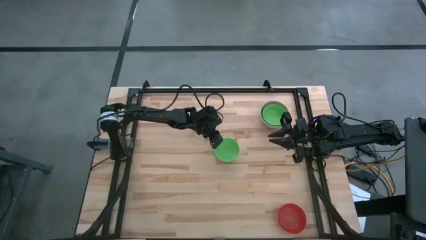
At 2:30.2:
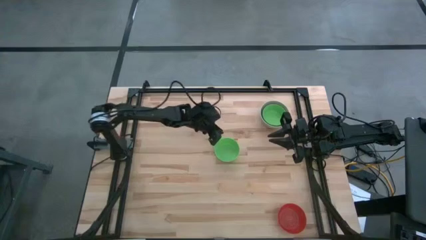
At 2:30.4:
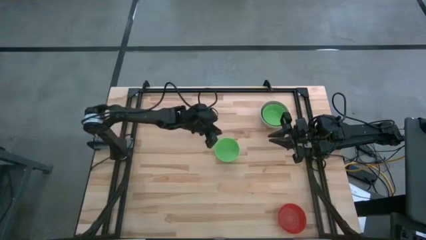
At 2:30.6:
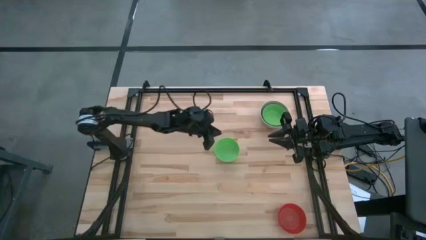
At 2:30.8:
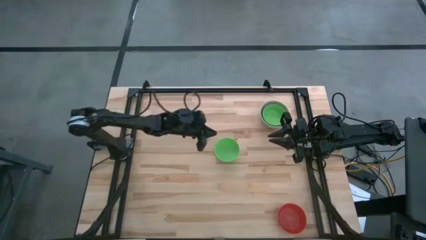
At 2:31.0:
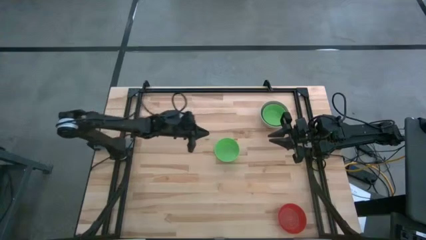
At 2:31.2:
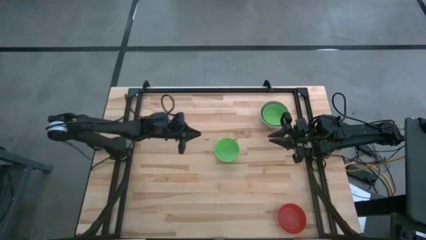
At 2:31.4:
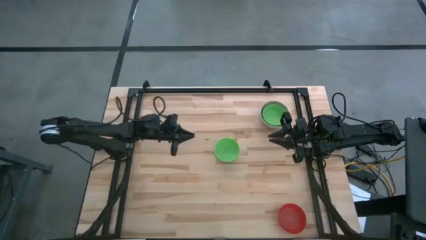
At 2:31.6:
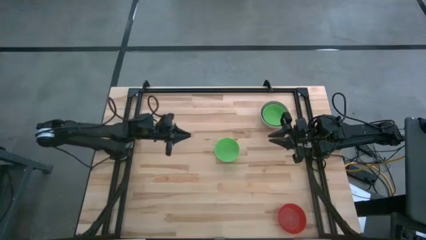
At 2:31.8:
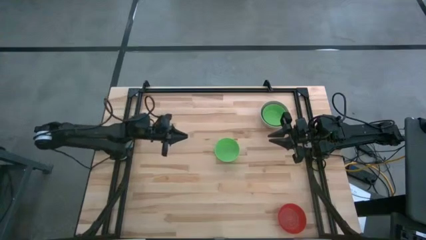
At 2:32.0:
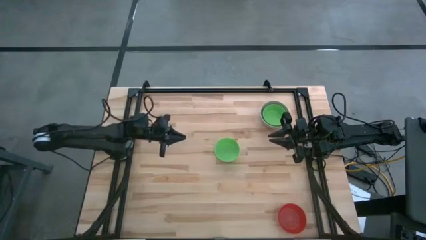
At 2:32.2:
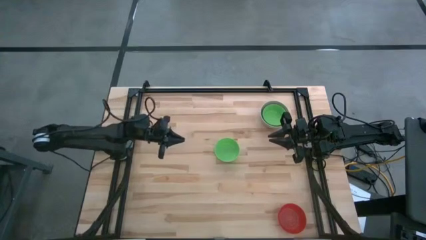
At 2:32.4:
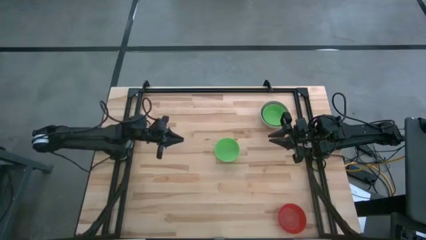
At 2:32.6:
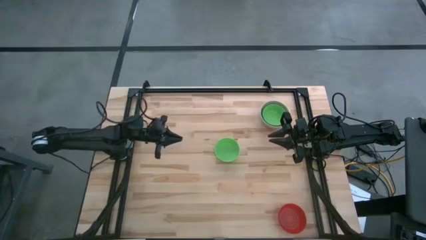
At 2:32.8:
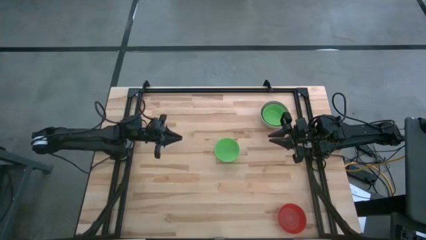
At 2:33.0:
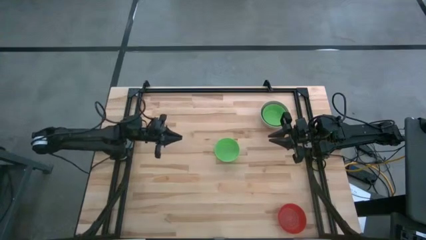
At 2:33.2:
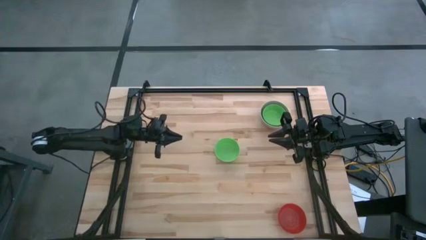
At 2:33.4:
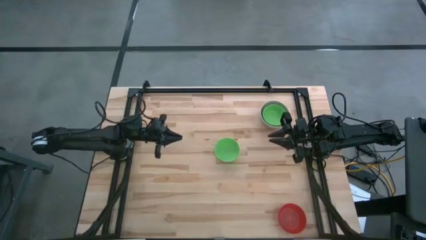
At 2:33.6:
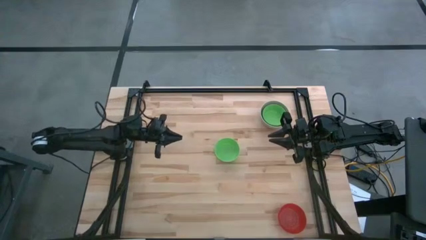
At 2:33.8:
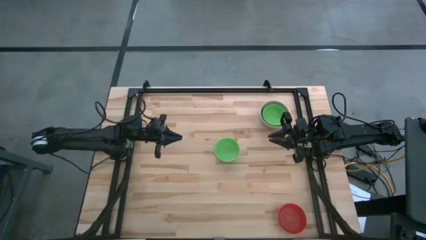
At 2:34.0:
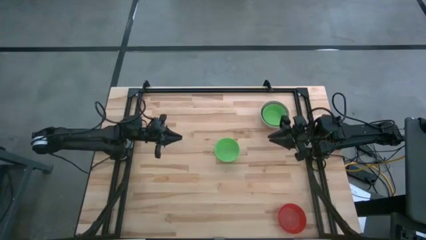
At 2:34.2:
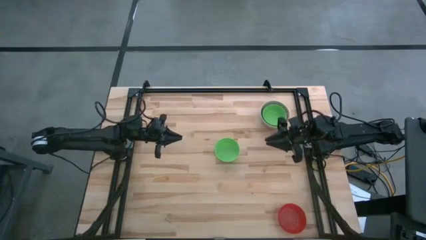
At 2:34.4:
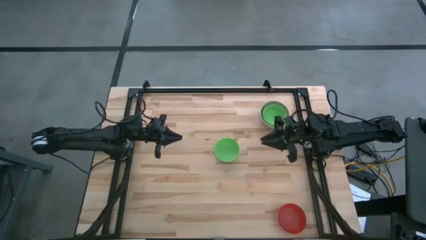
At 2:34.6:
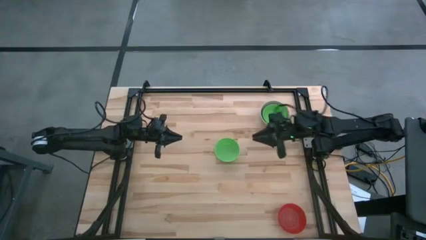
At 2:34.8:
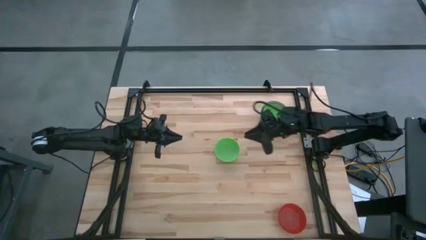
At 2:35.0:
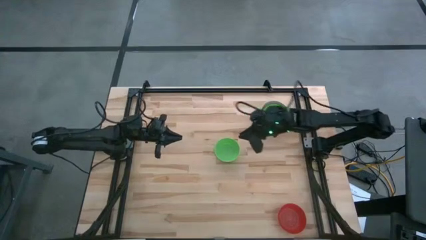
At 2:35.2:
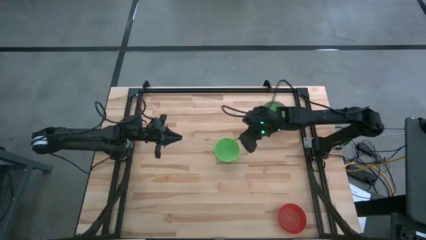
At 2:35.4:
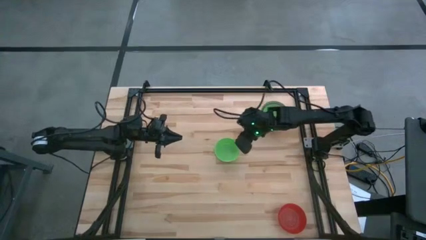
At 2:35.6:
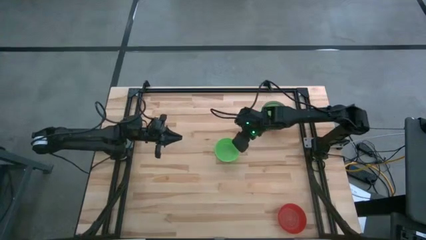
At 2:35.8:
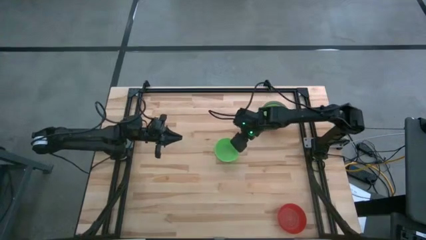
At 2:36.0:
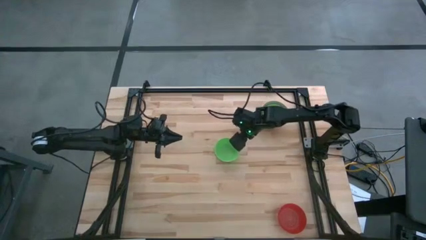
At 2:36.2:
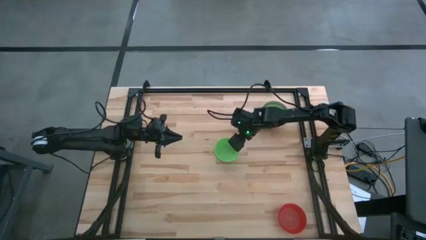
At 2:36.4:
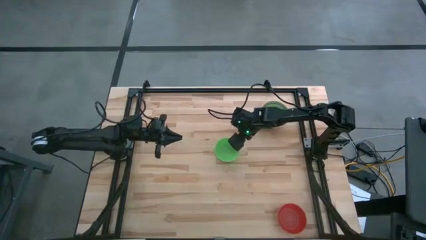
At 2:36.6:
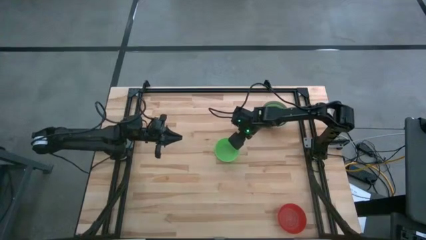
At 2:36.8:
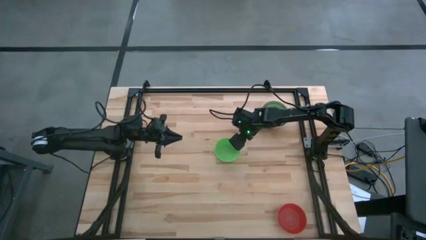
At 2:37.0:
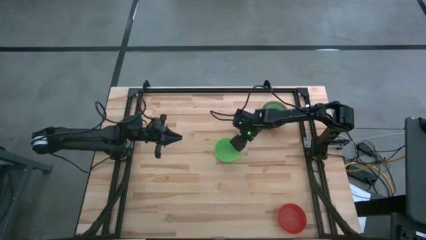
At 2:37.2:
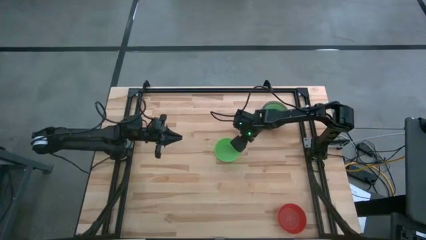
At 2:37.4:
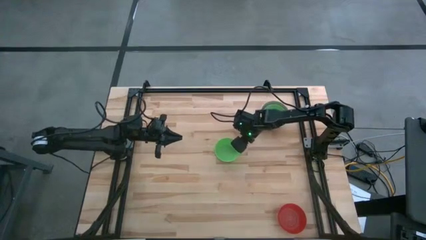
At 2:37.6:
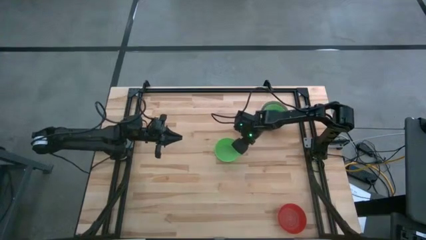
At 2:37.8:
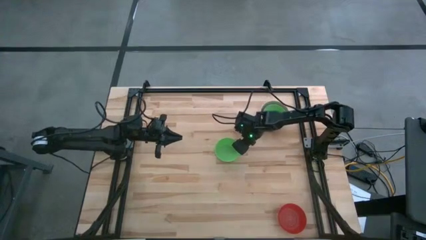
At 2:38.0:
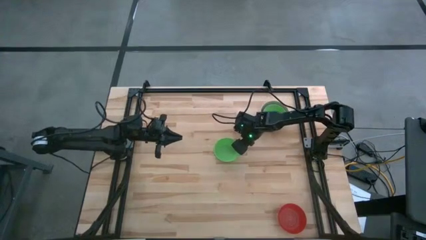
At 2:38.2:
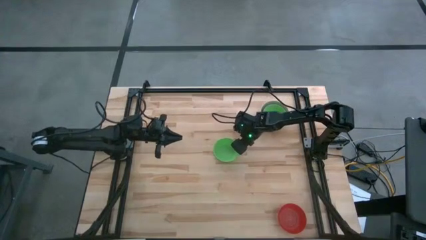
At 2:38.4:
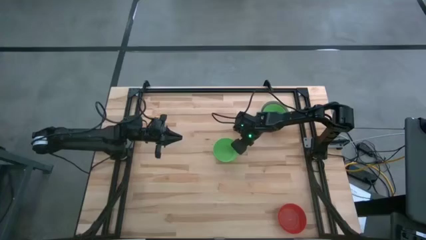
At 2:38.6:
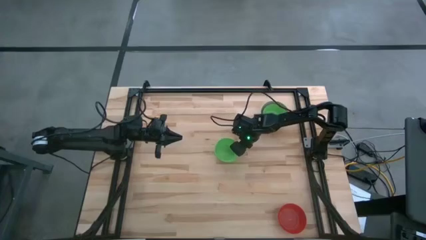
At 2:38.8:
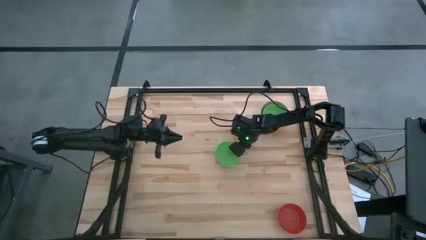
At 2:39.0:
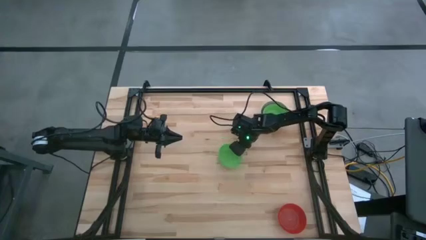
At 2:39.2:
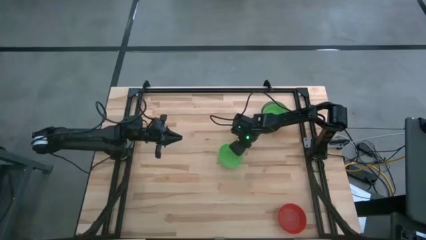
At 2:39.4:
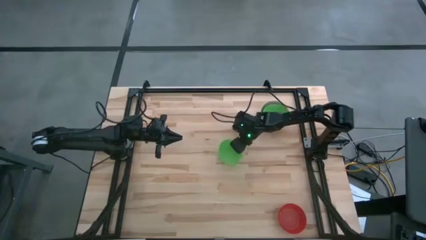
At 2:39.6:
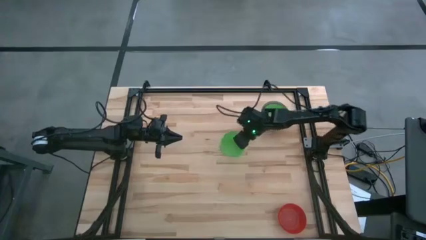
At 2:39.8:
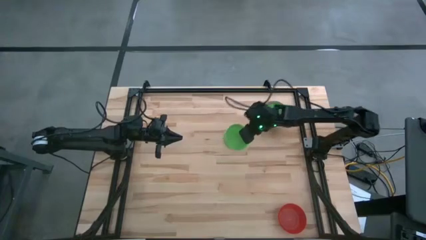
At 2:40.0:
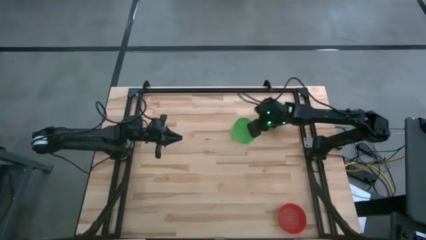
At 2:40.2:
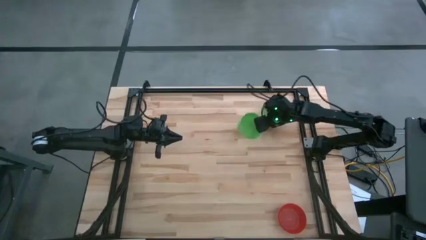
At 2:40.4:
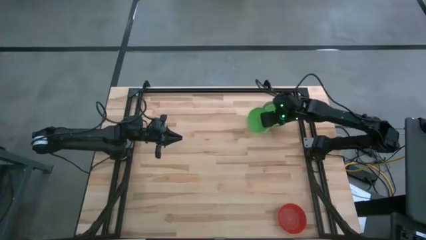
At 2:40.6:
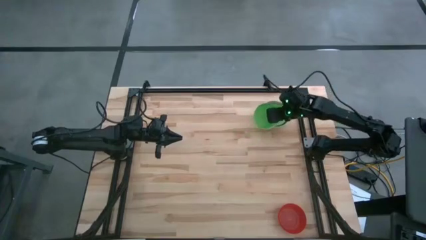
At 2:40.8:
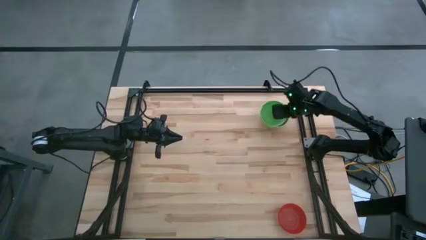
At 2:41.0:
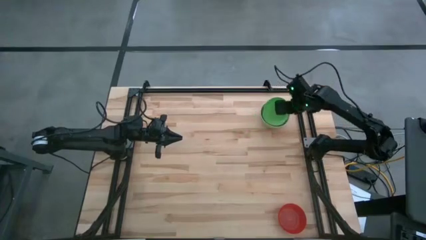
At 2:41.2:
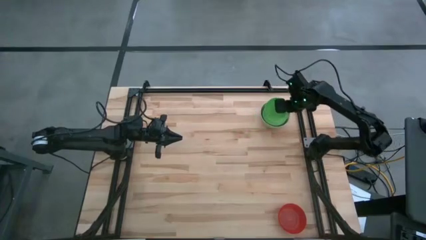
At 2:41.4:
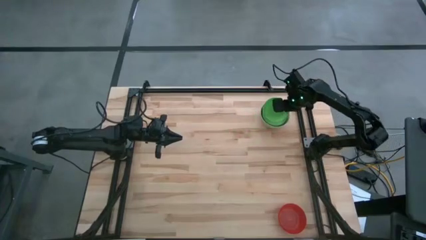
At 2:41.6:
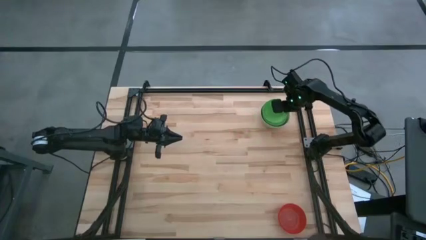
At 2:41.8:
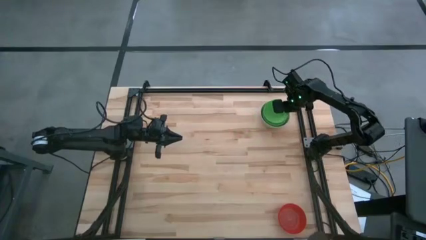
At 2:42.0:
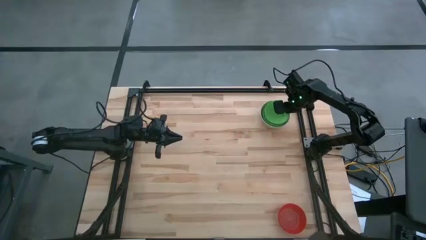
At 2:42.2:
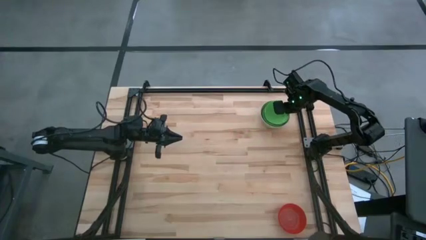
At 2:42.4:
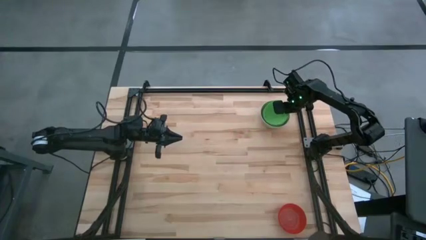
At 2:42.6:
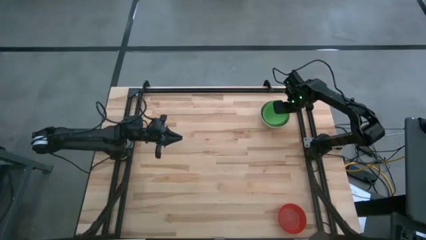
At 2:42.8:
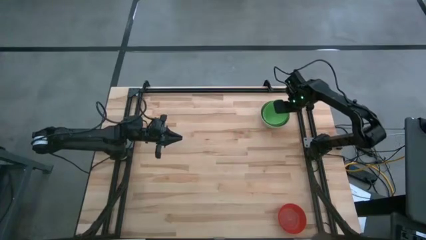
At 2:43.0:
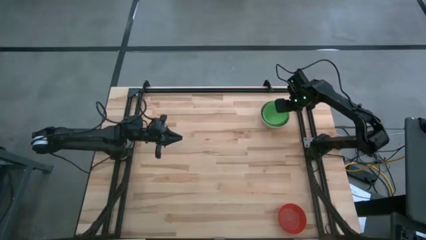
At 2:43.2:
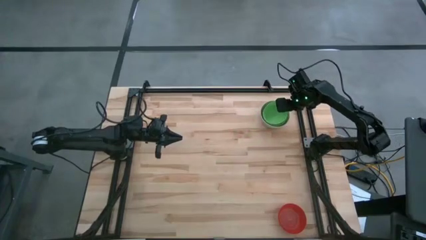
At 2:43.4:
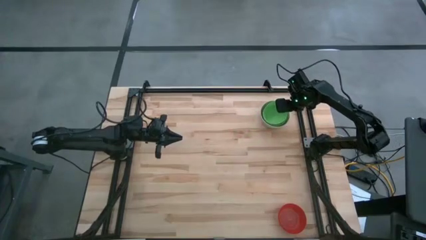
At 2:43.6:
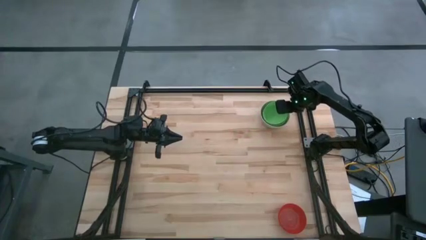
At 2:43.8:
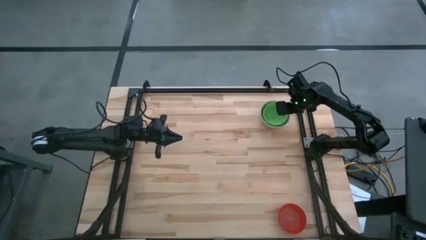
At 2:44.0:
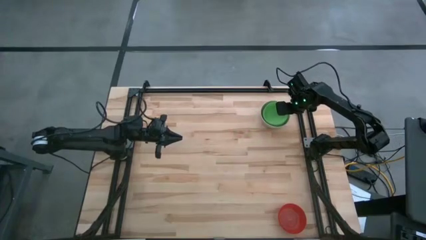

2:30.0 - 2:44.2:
Stack the green bowl on top of the green bowl

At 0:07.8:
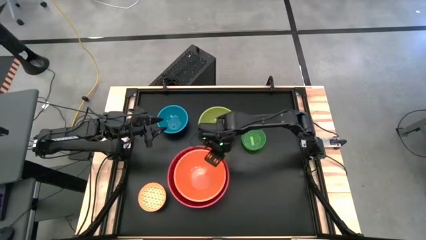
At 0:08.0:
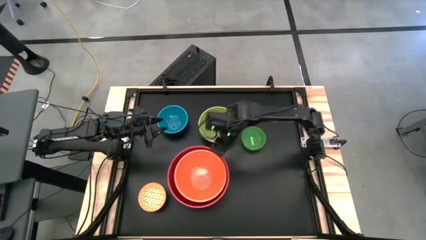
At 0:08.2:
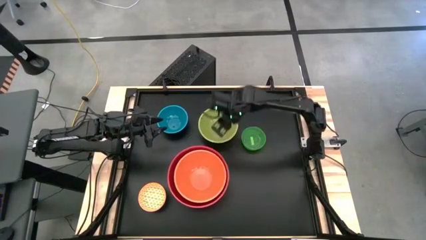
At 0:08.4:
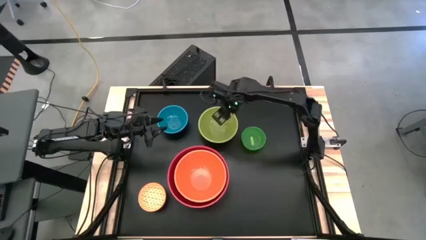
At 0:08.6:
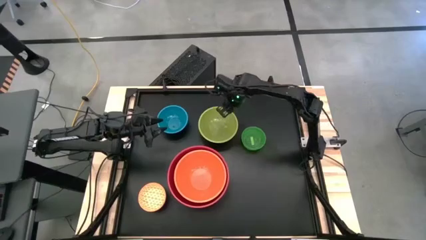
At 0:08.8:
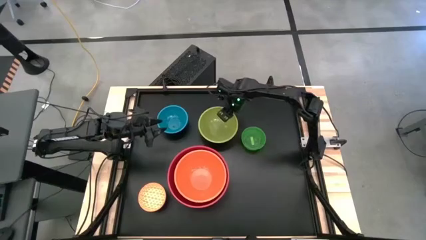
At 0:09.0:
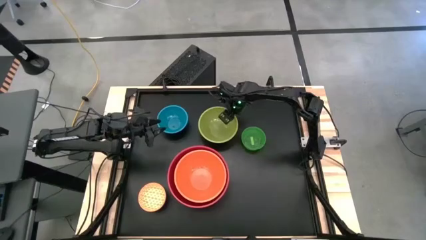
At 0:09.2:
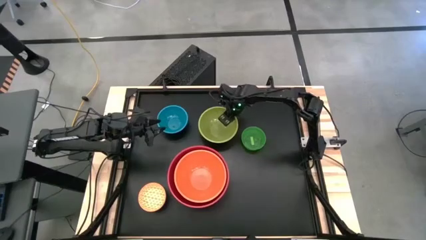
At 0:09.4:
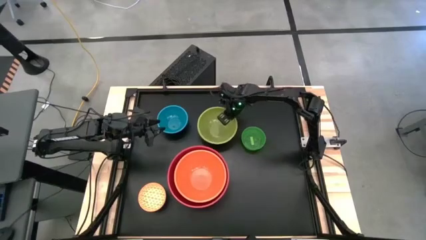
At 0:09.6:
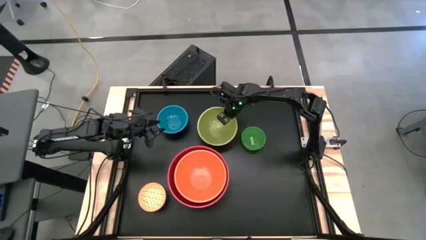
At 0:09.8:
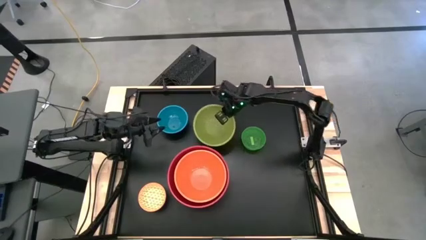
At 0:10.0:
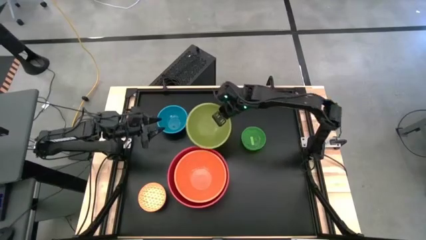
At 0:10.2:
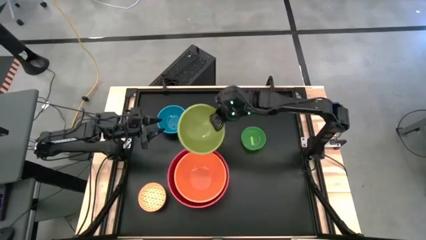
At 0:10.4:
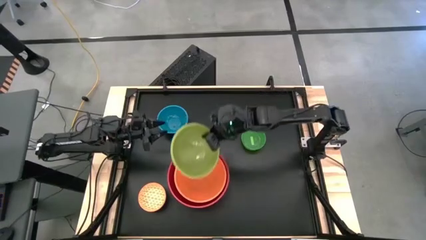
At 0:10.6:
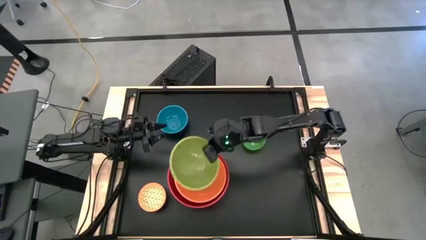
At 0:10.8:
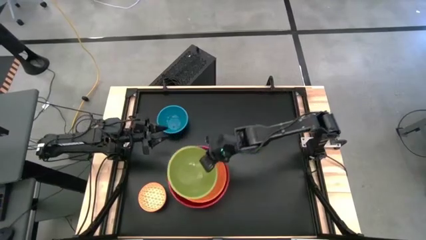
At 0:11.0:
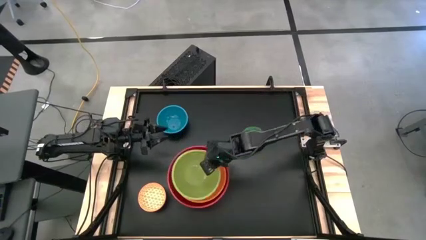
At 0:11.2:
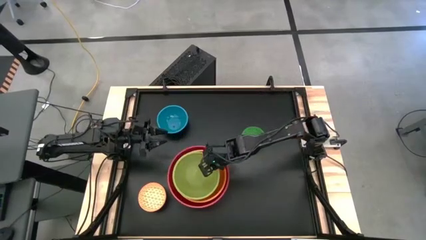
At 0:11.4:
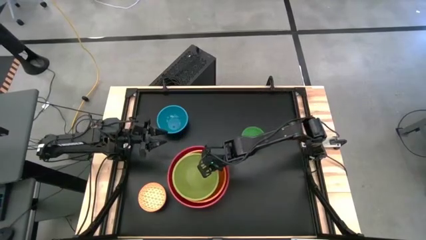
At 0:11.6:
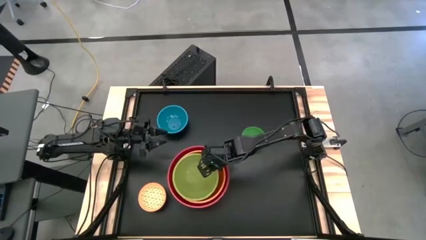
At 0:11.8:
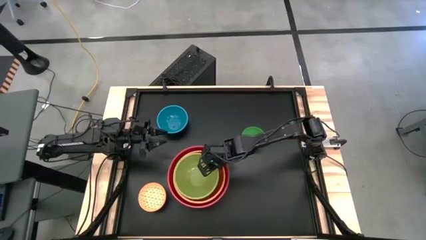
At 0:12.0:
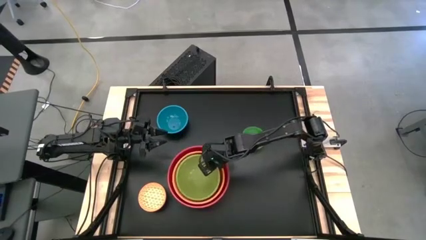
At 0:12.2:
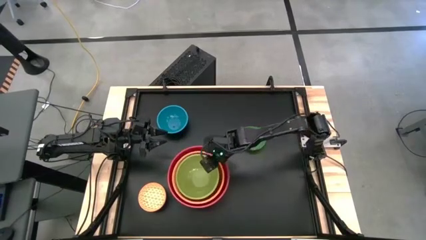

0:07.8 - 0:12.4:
Stack the green bowl on top of the orange bowl
